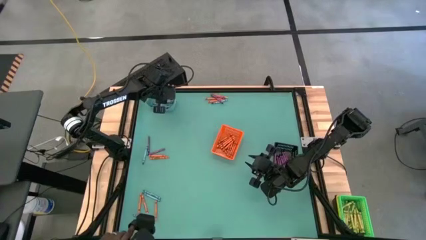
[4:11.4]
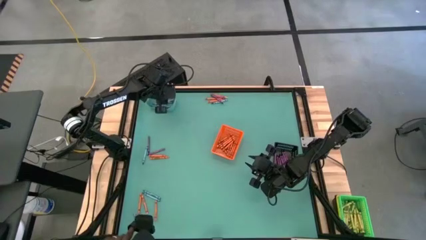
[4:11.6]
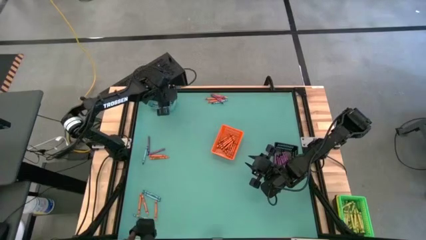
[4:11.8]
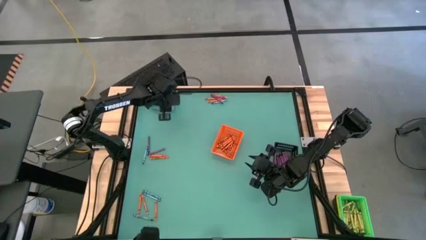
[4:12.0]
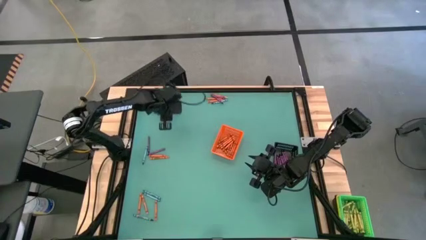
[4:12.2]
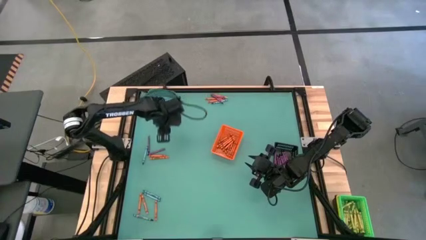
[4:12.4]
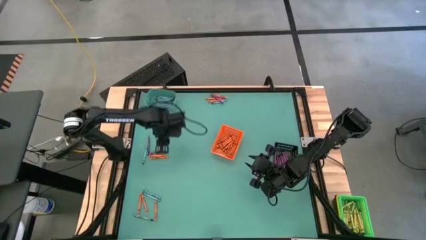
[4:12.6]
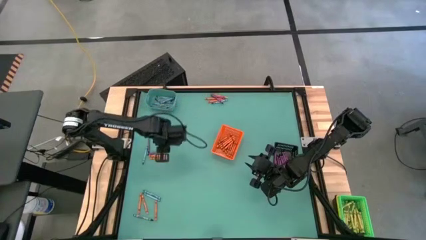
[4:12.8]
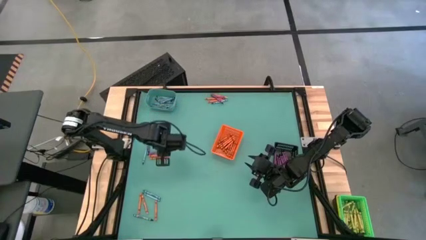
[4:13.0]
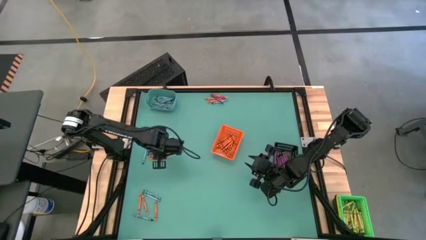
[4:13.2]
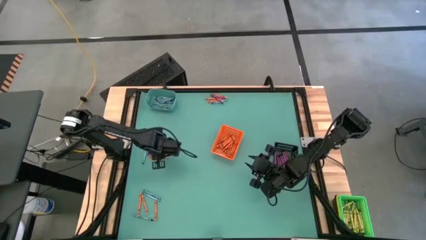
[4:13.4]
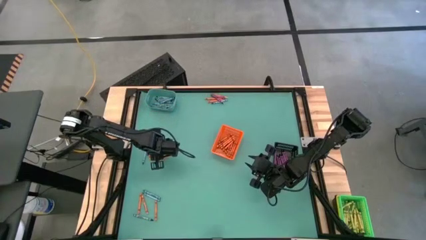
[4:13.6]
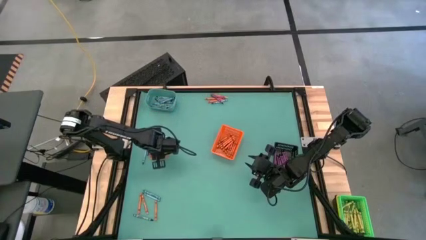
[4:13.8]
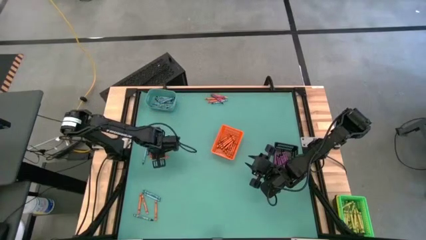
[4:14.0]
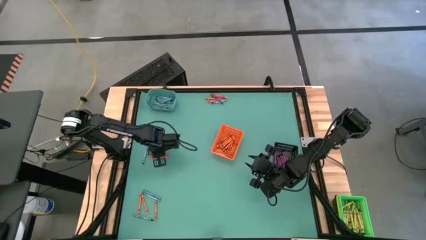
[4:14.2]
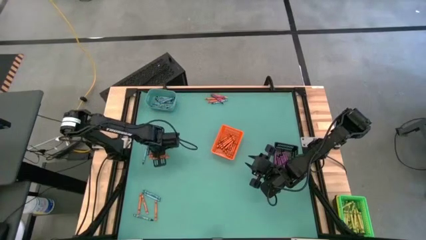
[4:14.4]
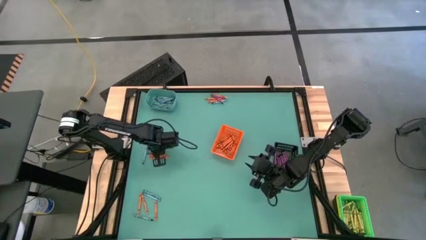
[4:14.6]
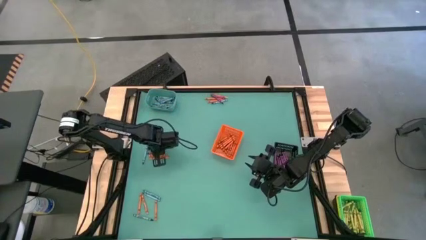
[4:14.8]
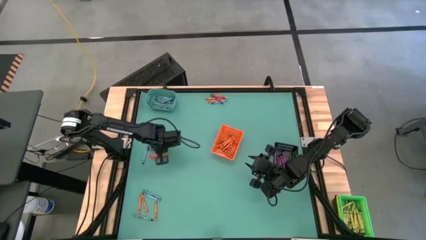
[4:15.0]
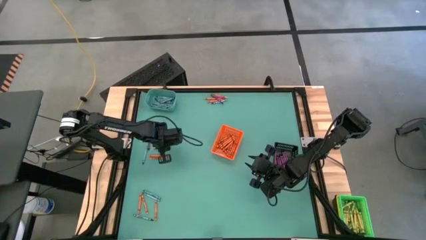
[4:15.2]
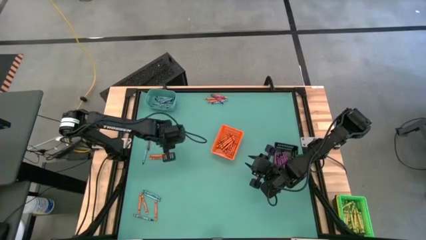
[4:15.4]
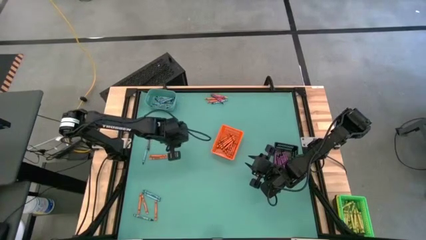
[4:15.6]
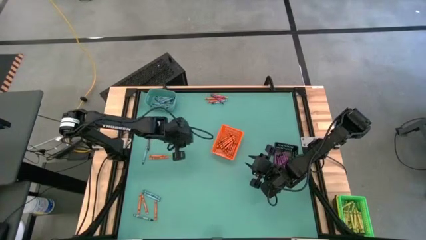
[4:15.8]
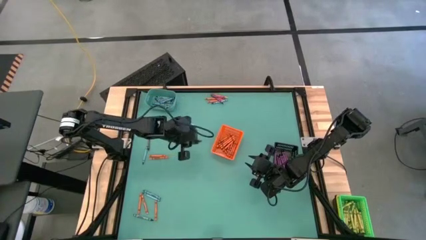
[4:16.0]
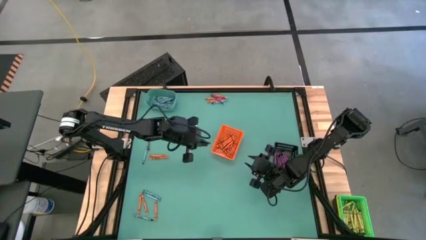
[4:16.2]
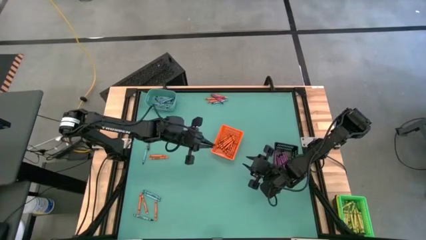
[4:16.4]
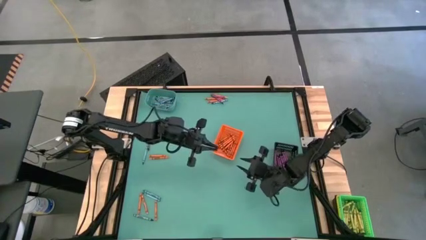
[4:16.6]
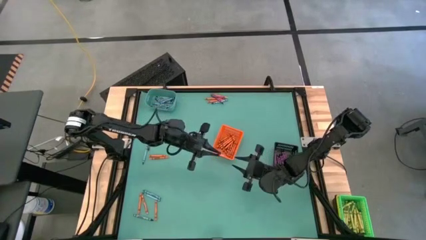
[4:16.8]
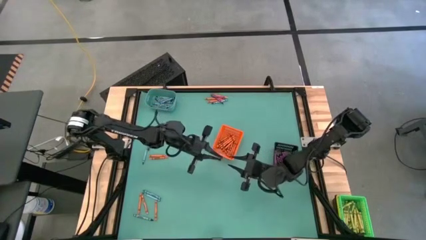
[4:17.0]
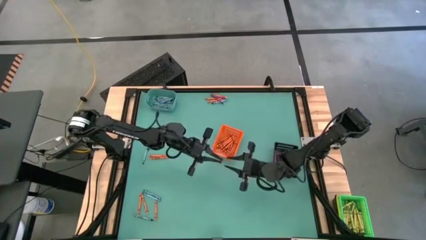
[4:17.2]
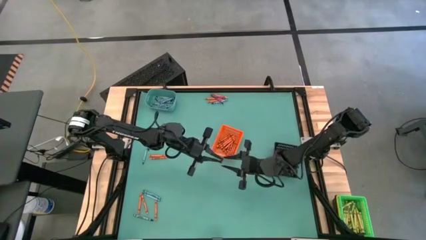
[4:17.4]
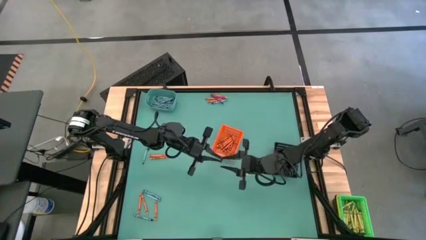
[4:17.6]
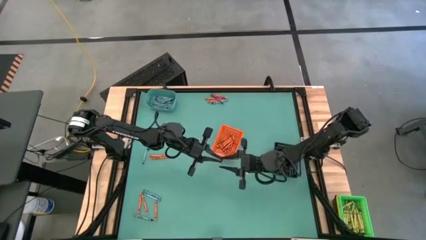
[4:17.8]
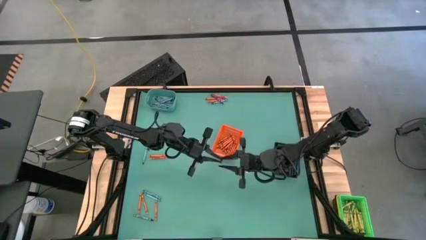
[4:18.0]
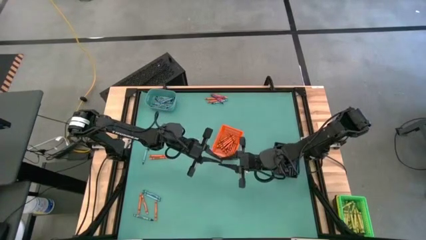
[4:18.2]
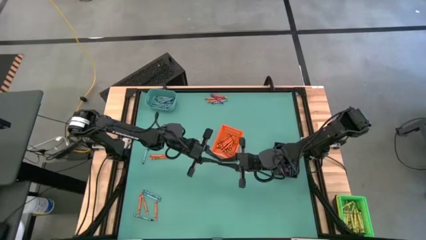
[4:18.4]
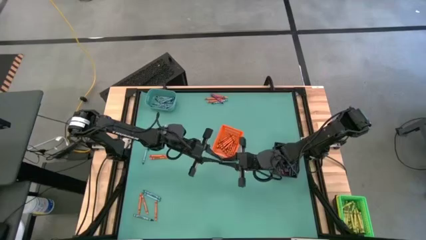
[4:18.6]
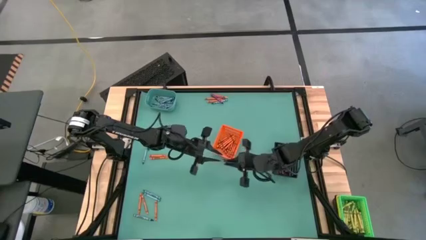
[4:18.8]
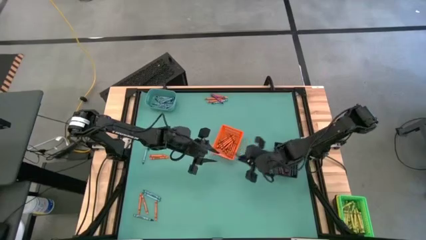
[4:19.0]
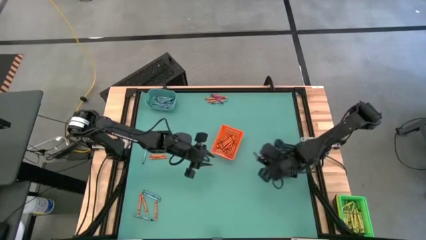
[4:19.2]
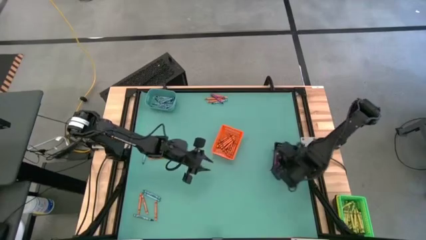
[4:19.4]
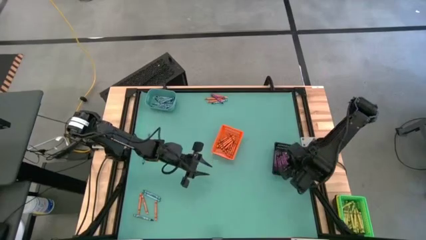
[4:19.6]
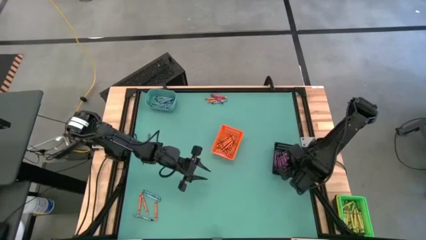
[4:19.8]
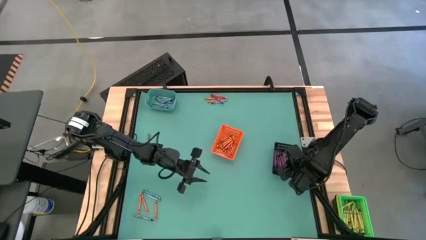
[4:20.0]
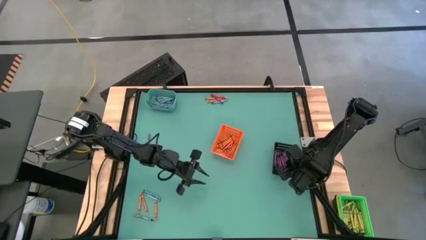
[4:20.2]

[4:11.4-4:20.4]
Task: Sort crayons
Put the violet crayon into black bin

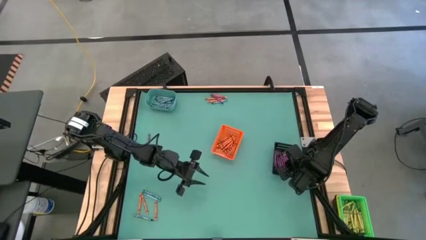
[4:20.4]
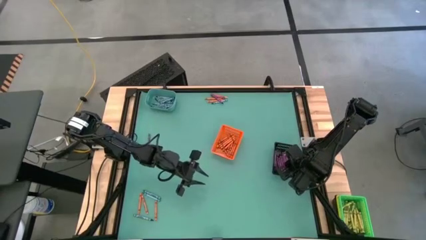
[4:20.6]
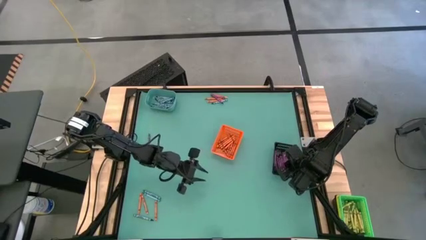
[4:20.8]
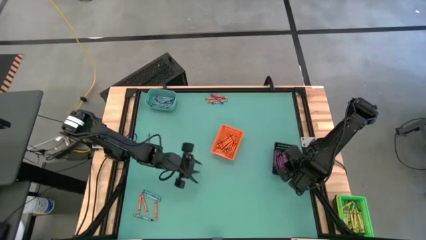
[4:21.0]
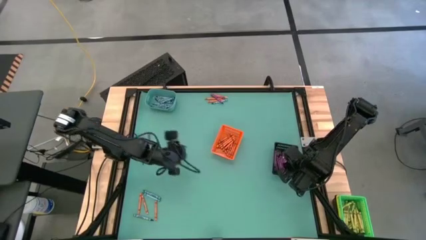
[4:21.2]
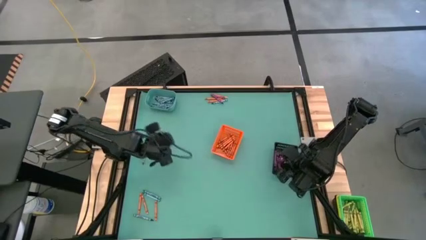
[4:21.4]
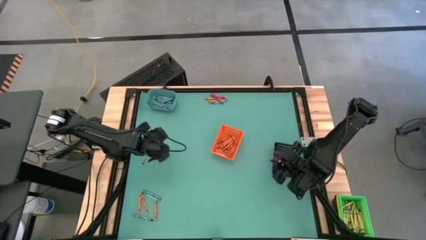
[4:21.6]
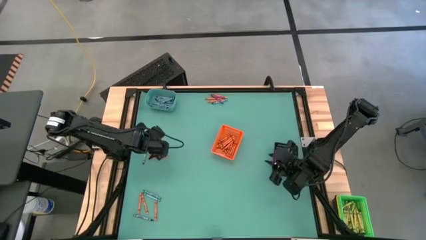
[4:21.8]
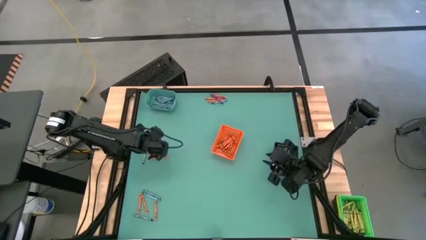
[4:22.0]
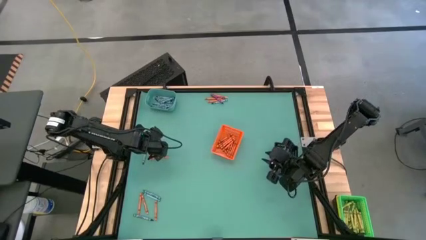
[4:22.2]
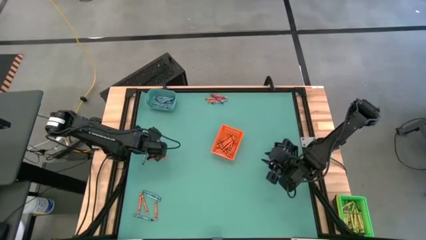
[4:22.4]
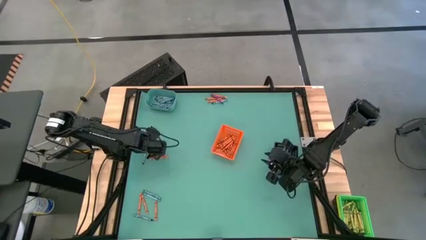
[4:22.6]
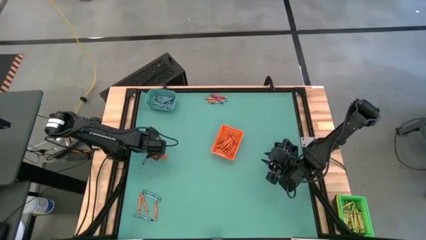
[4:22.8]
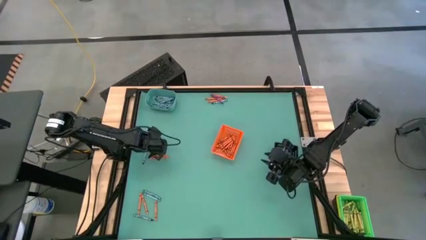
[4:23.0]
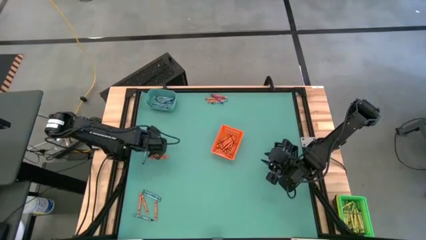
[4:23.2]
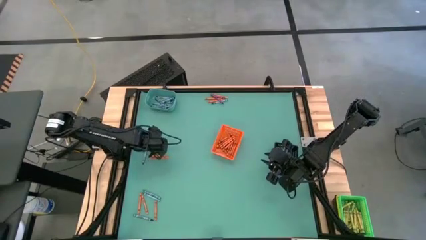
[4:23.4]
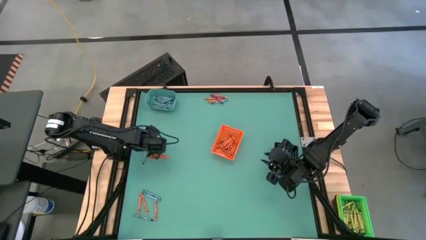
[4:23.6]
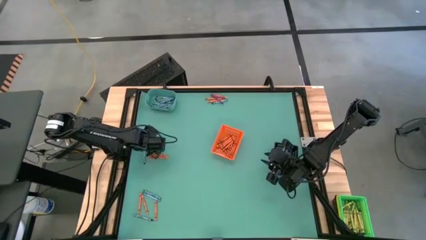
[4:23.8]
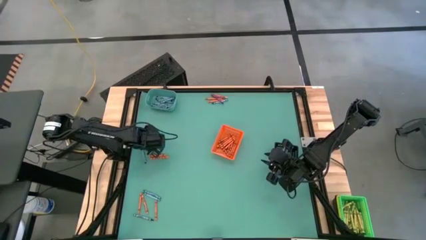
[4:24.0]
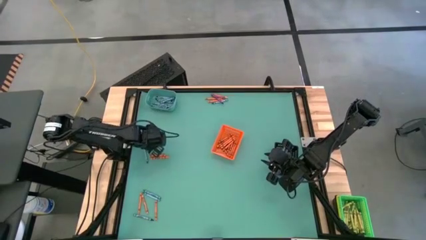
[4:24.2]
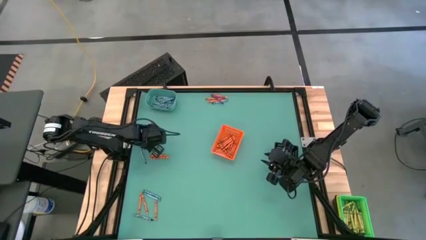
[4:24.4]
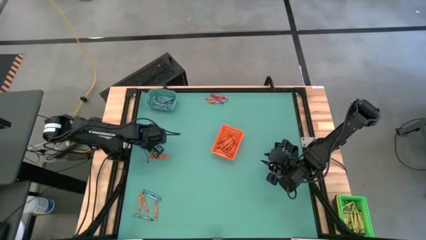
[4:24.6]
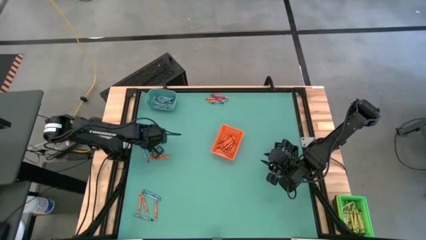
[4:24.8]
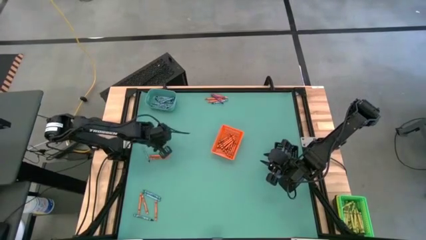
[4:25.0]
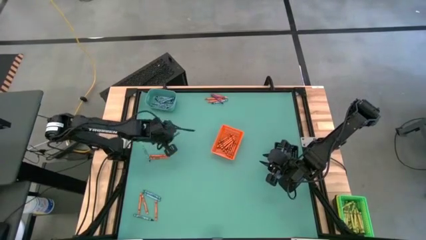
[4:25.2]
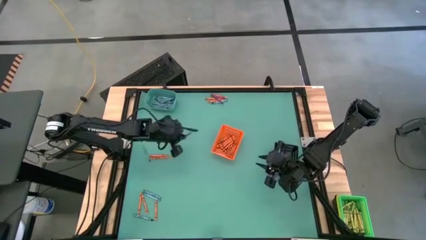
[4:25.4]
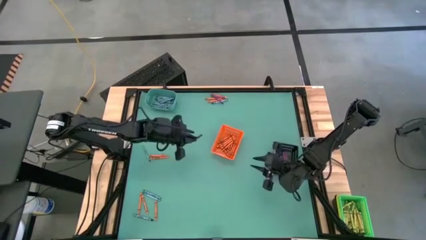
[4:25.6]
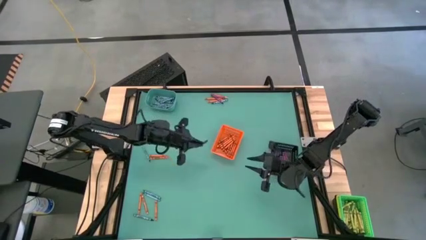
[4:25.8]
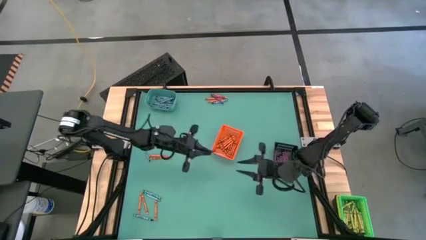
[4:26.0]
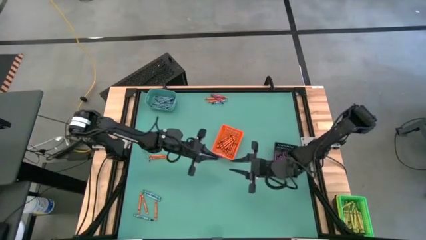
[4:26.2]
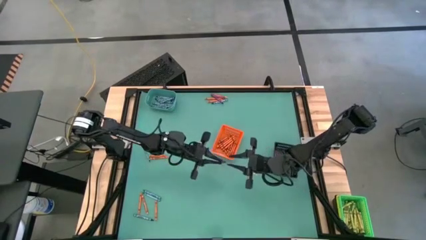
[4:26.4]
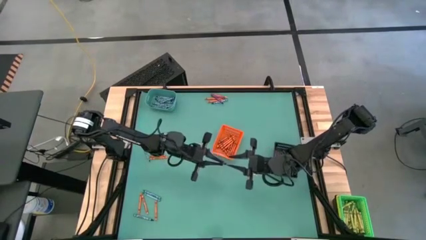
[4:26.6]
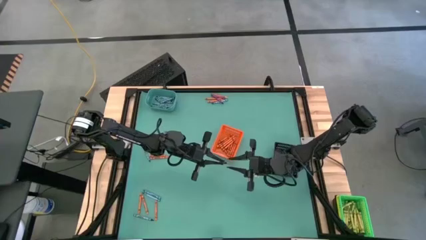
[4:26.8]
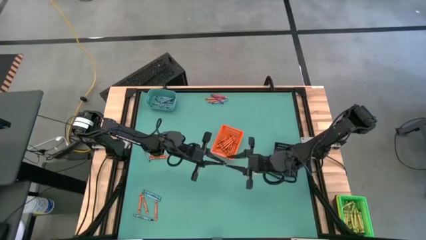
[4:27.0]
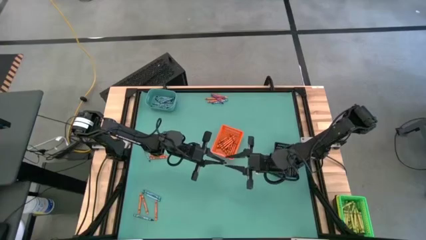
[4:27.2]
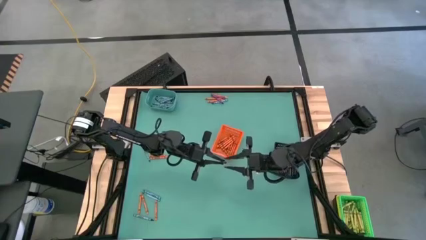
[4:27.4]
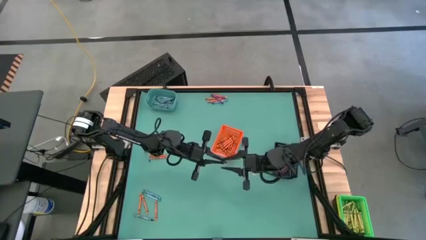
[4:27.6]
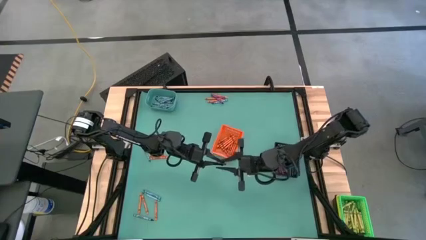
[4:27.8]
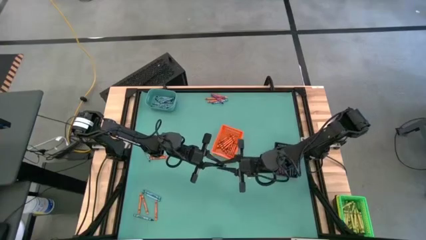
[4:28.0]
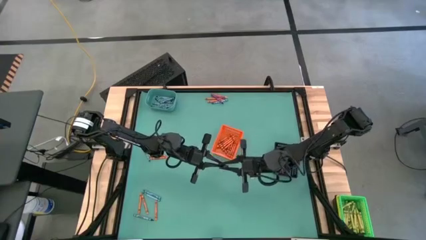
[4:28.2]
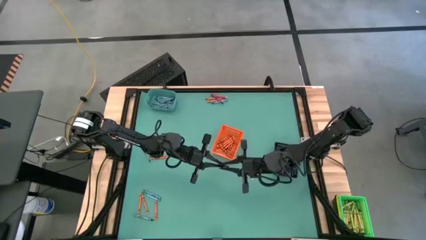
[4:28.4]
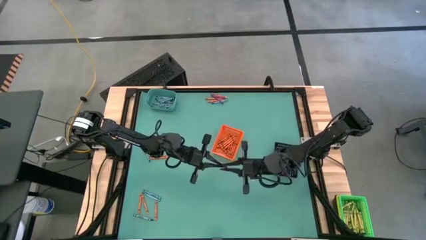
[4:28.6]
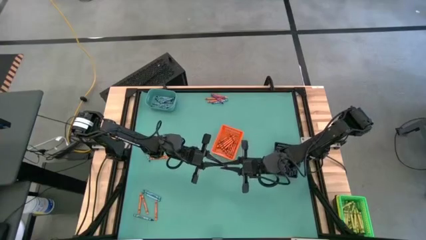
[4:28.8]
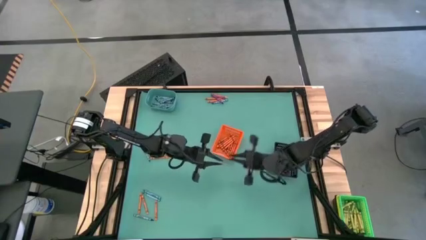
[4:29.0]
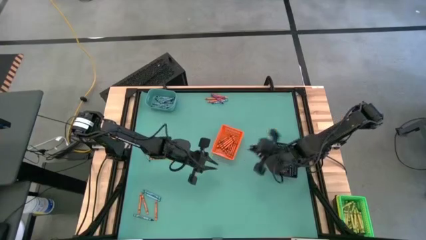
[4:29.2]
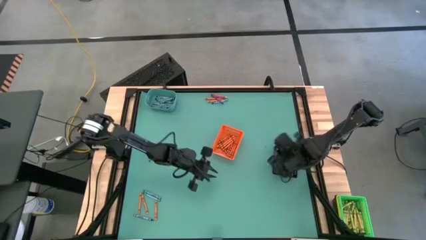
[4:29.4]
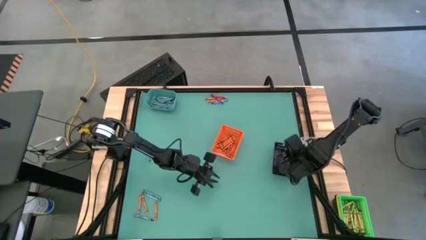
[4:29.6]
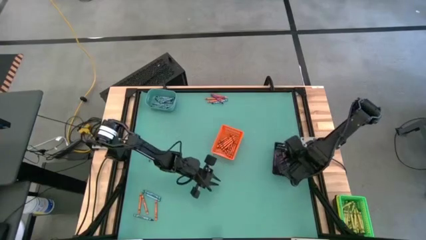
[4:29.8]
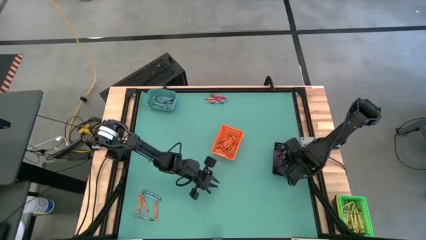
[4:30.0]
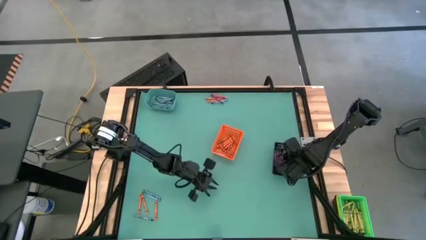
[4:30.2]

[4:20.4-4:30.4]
Put the violet crayon into black bin
